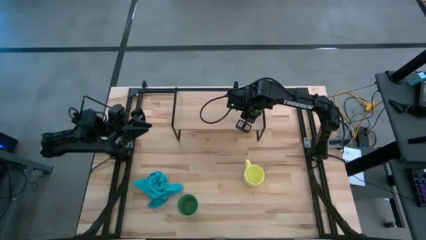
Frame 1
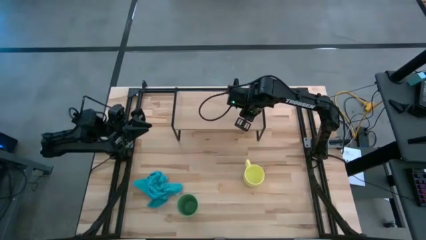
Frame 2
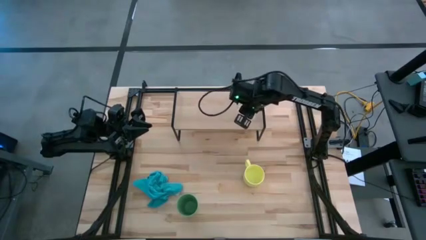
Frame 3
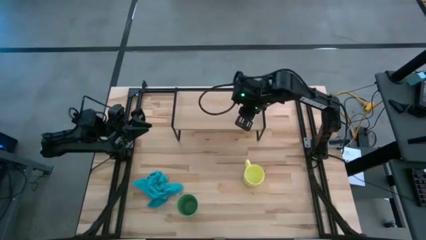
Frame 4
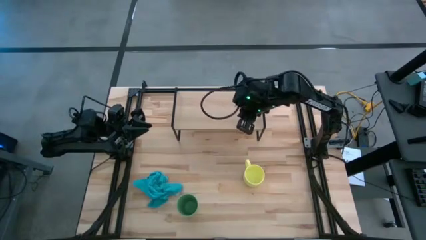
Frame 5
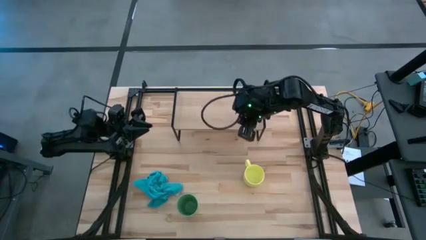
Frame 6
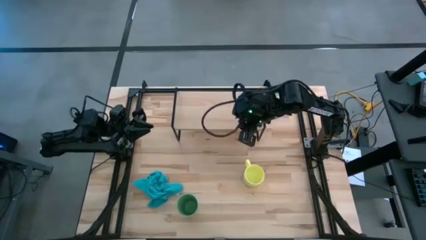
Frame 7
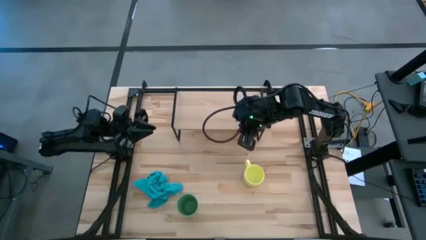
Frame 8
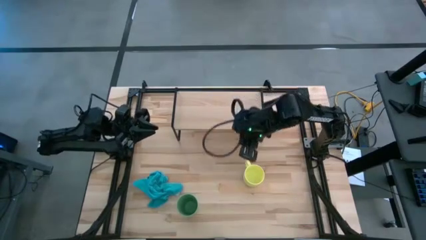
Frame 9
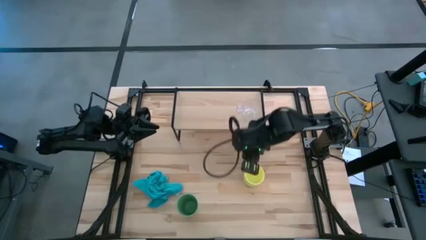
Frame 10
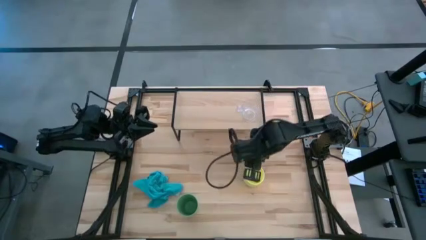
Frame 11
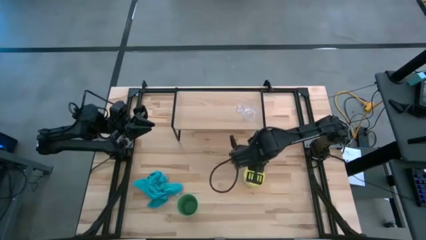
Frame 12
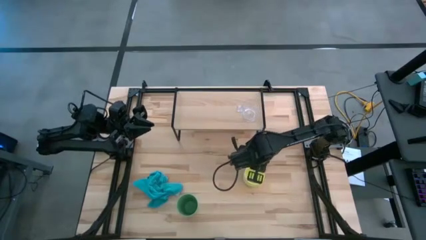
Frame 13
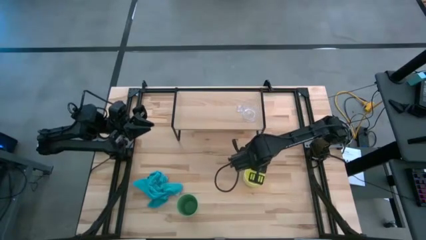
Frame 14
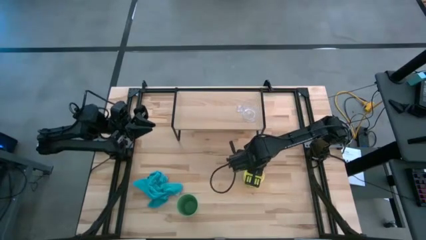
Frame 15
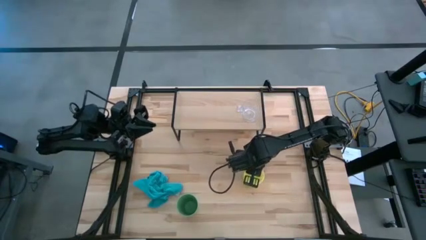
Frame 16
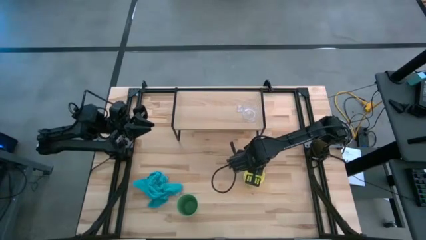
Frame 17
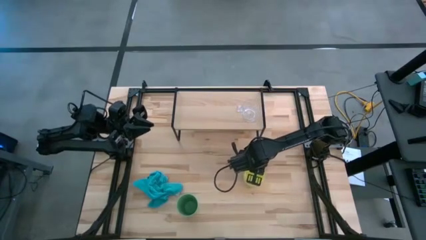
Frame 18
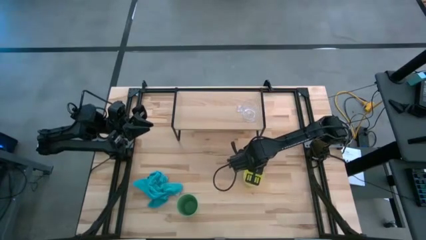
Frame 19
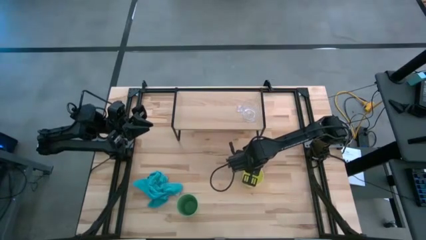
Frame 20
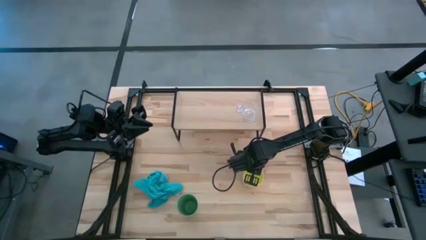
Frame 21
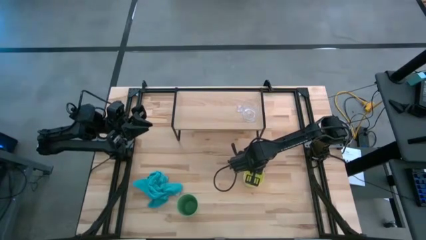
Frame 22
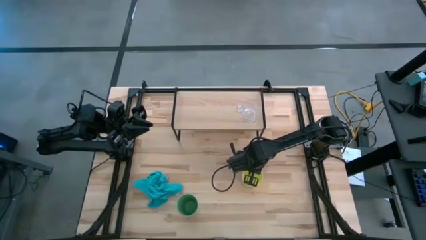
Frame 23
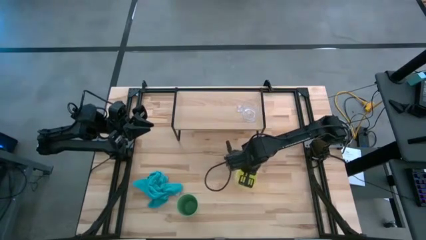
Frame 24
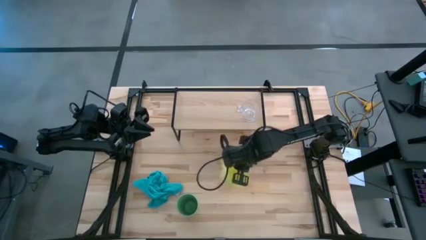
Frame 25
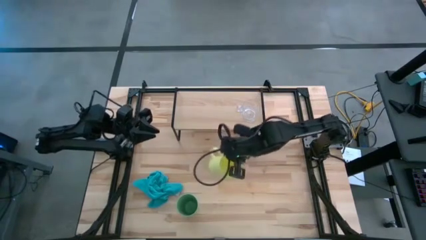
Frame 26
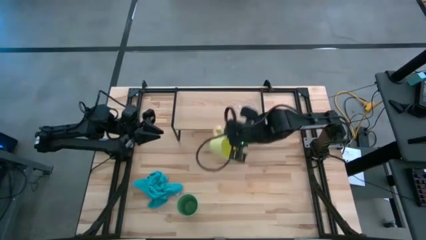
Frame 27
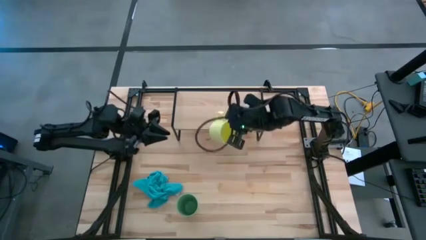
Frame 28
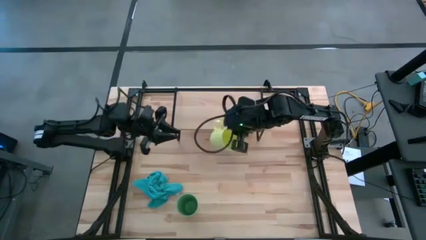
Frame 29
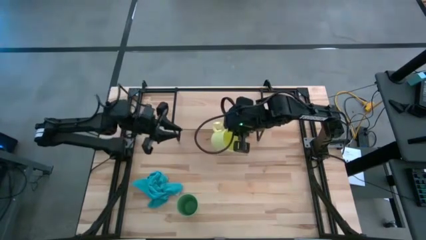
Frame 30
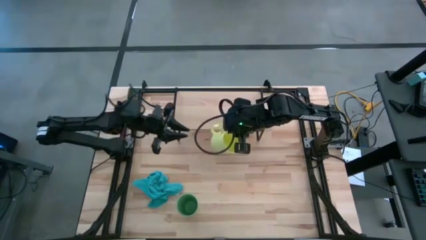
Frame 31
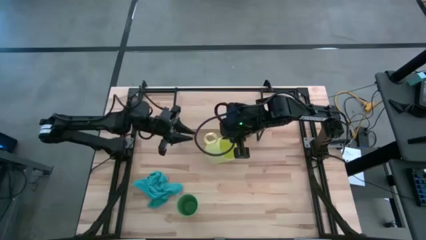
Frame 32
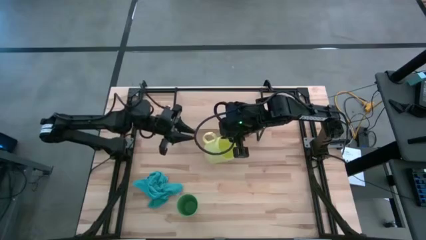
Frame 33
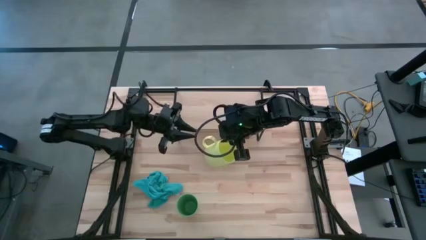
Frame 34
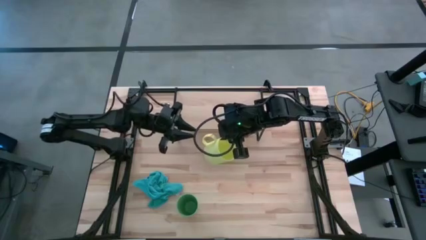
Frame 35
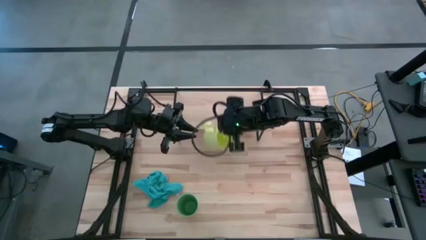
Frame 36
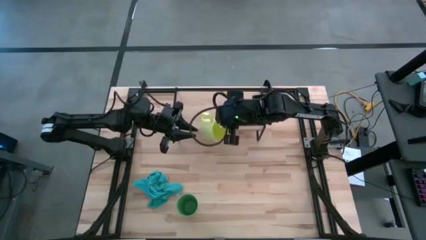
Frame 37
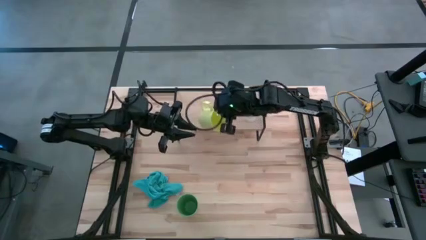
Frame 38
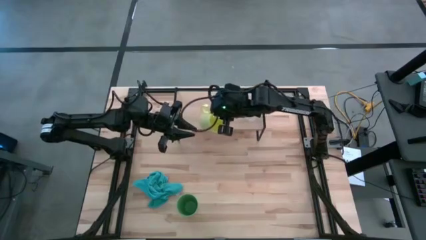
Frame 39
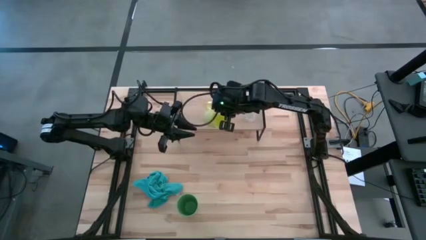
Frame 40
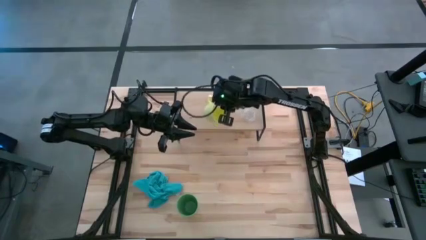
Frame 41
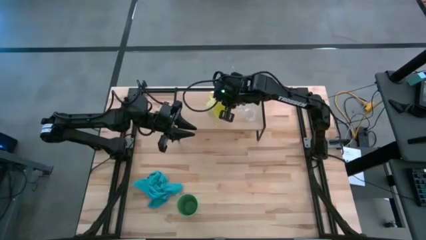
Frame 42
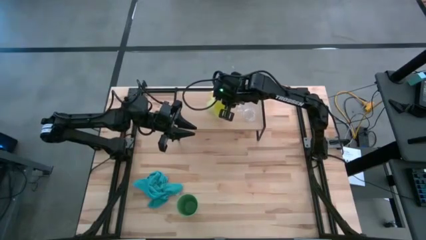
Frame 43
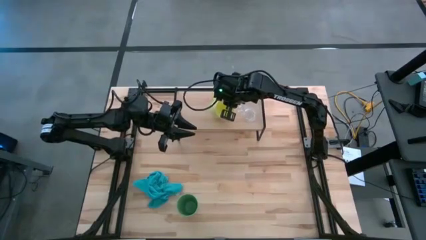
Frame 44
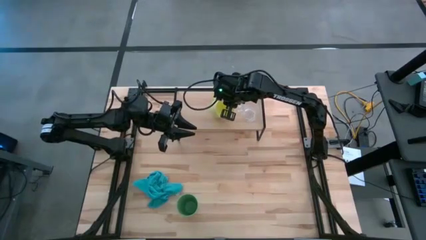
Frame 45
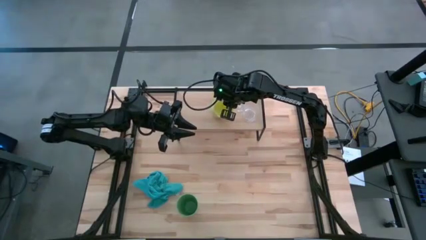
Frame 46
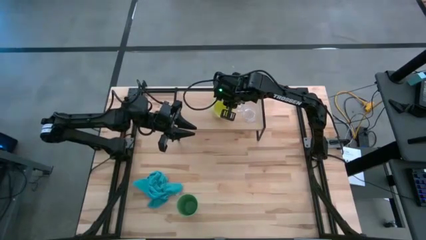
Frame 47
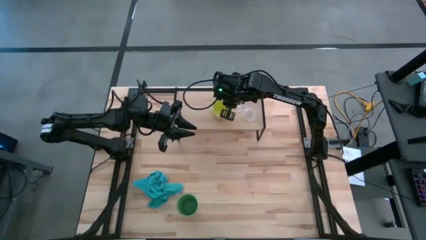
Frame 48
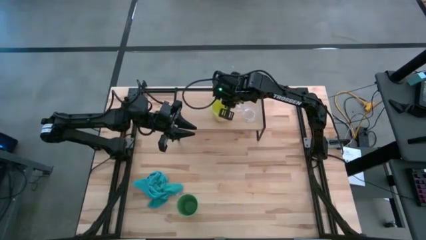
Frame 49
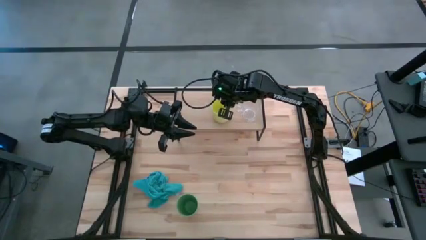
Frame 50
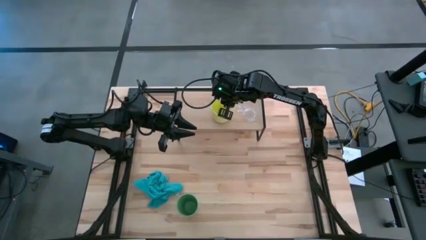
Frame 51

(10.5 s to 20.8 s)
Task: Stack small to large cups/mugs on shelf
Put the yellow cup on the shelf

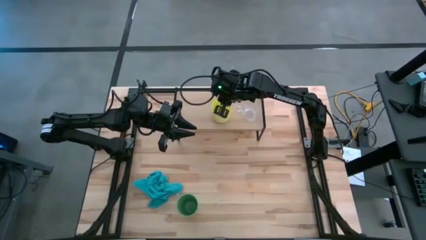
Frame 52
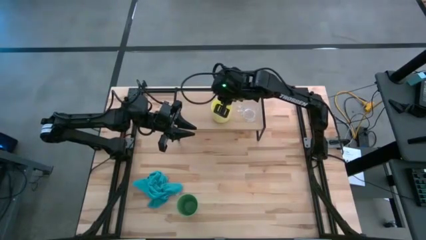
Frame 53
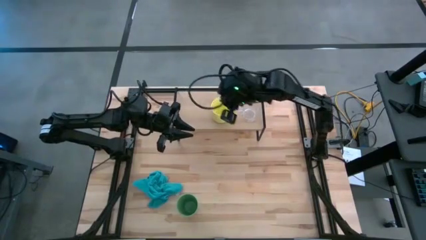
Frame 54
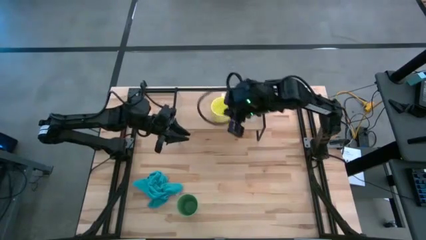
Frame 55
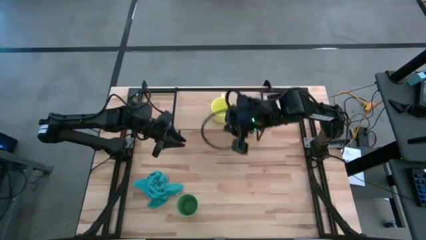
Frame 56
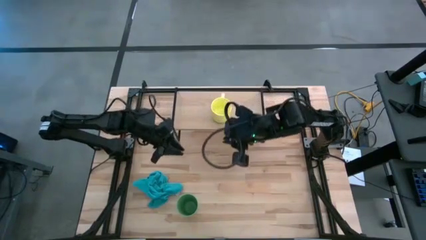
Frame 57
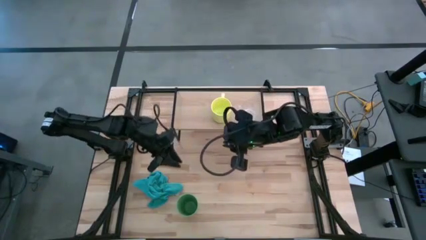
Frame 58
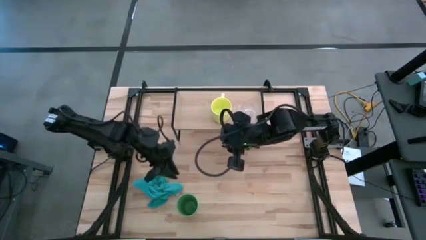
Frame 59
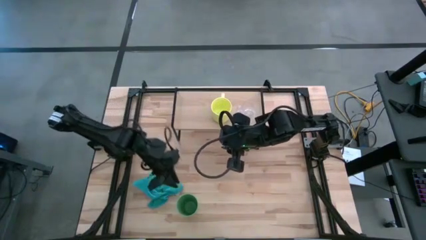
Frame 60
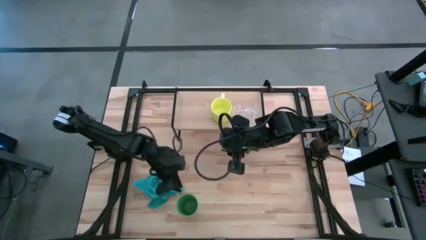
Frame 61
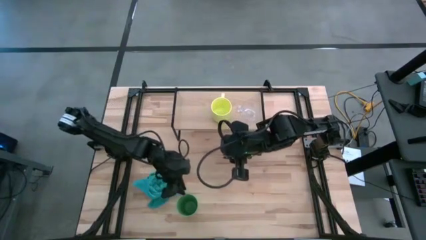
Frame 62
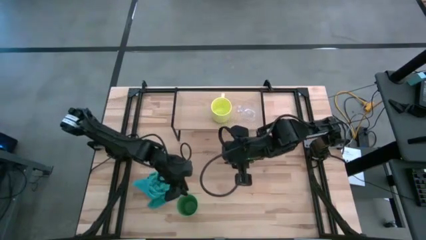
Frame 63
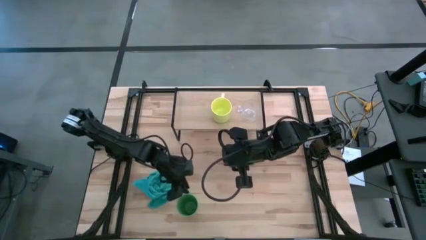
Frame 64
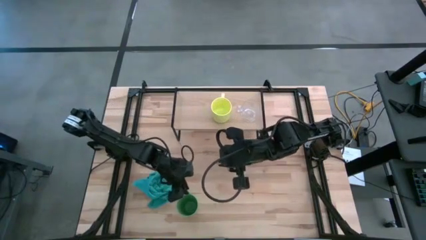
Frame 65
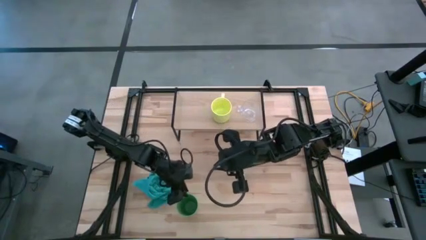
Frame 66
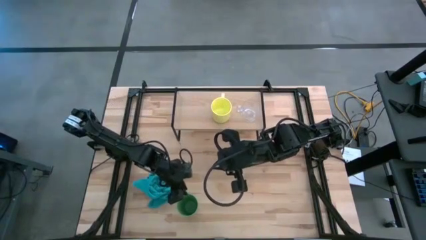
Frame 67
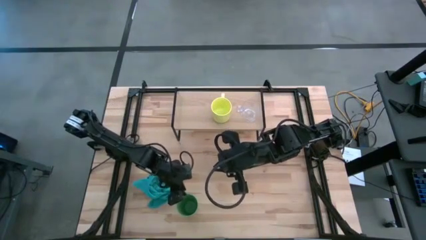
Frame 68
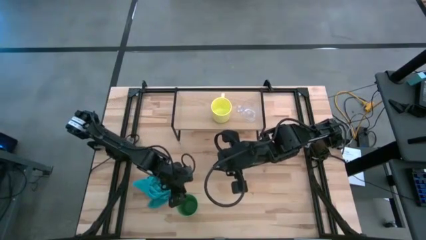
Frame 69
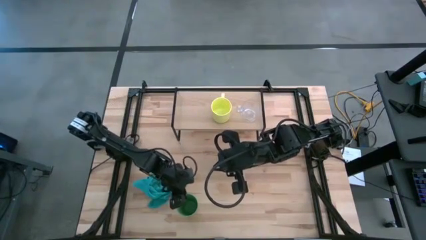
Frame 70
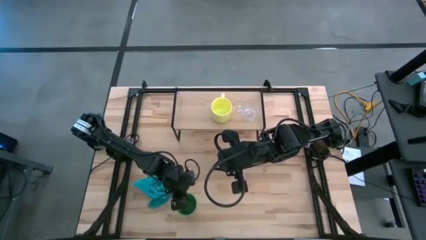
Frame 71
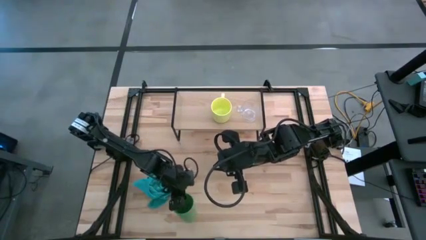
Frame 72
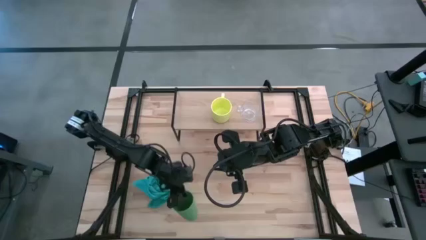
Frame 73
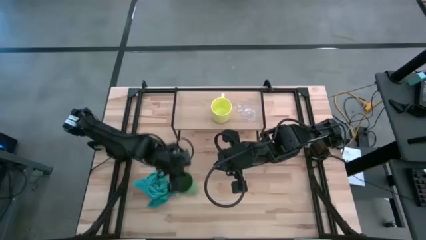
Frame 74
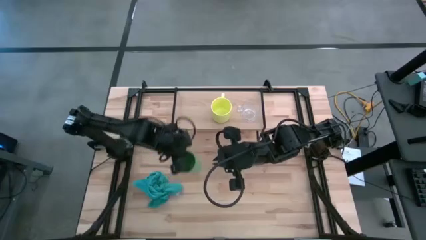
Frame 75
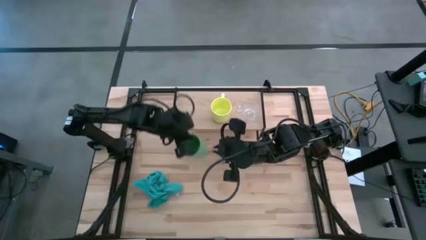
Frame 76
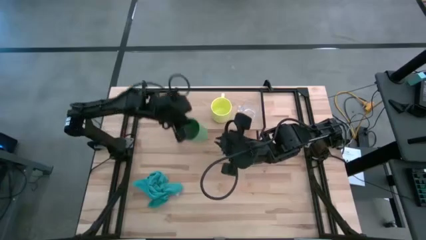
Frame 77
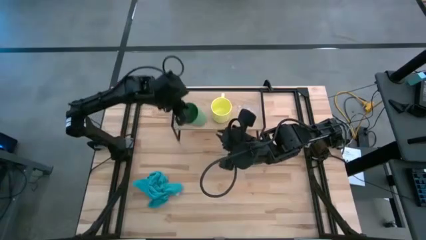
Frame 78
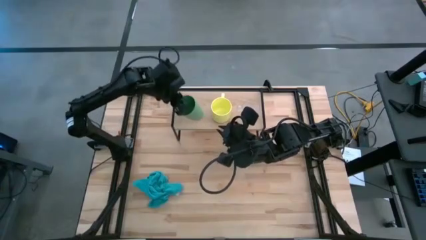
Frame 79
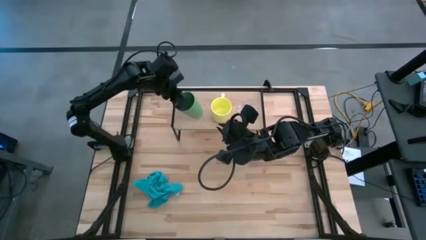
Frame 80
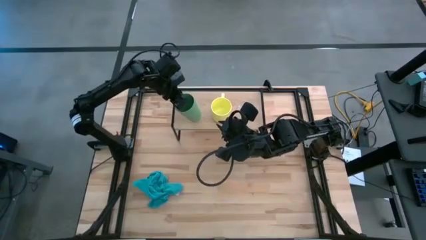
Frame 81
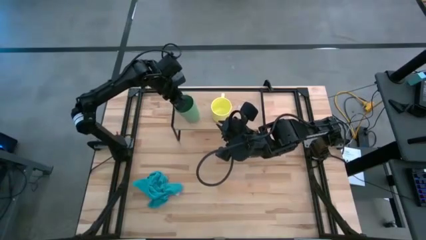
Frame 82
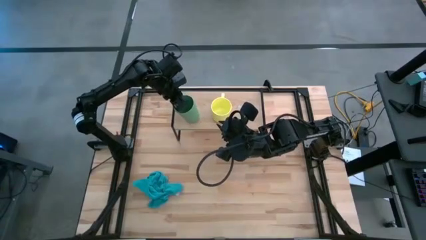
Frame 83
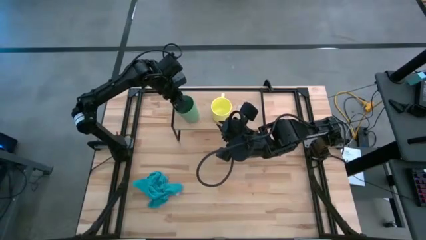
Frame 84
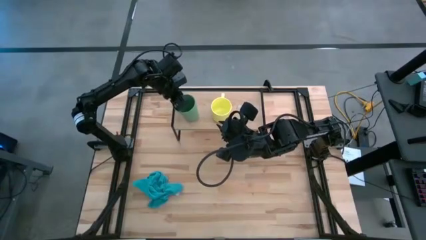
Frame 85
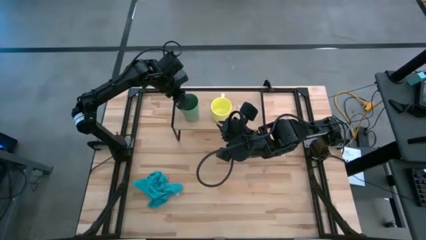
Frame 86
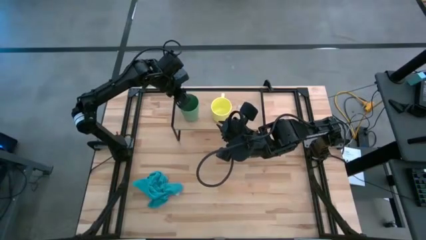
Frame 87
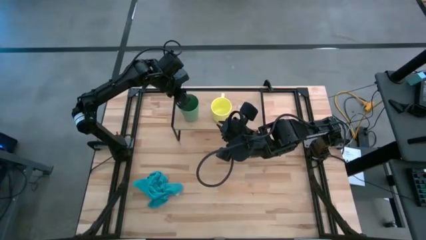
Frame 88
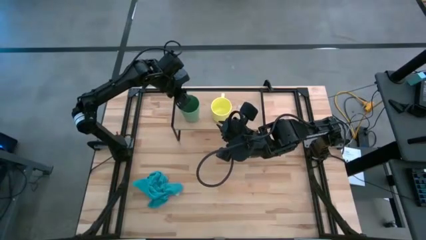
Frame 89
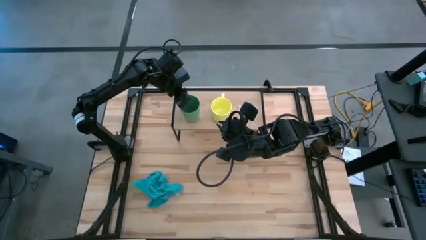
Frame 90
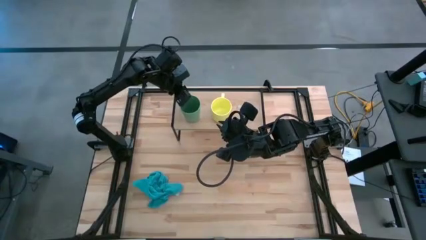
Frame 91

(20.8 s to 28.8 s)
Put the green cup on the shelf
